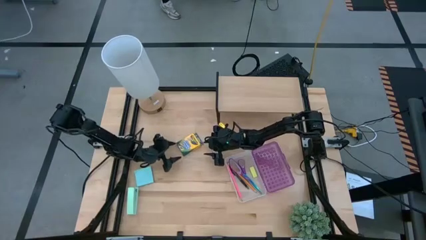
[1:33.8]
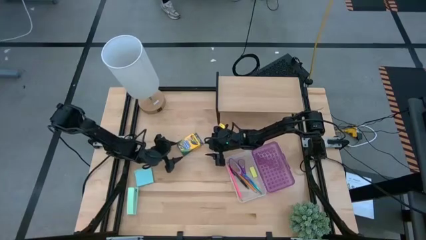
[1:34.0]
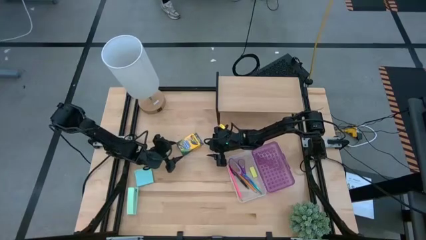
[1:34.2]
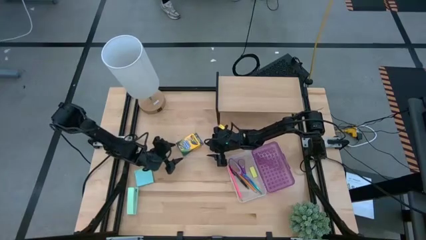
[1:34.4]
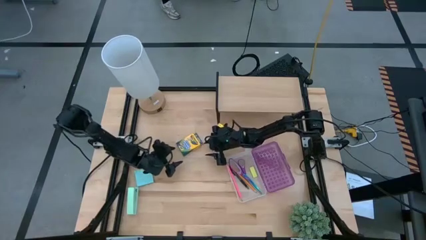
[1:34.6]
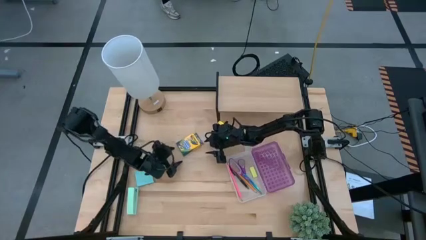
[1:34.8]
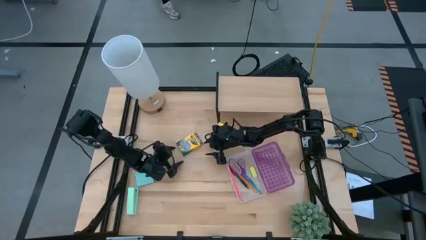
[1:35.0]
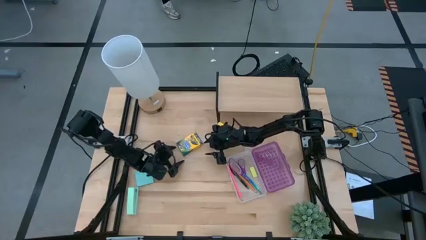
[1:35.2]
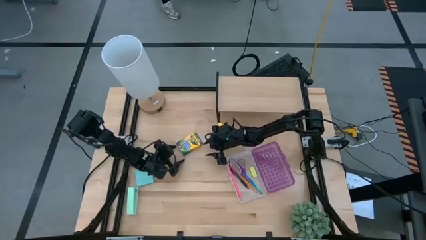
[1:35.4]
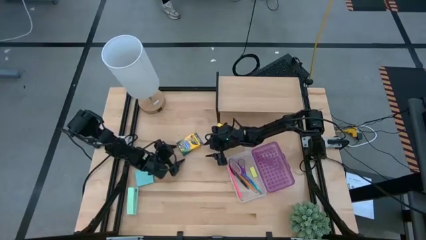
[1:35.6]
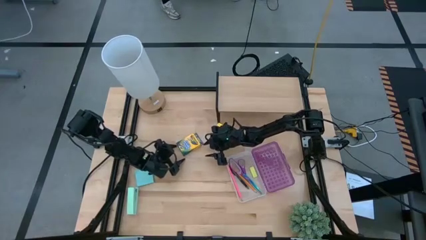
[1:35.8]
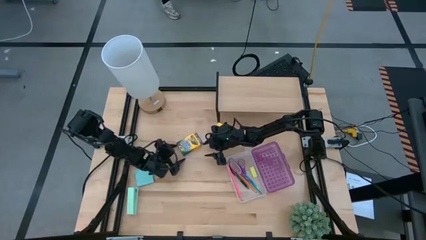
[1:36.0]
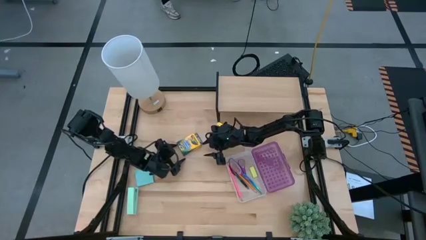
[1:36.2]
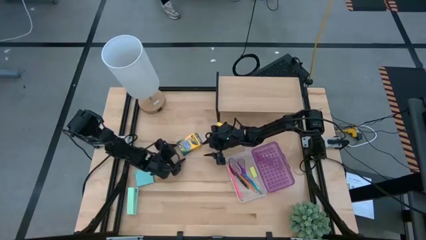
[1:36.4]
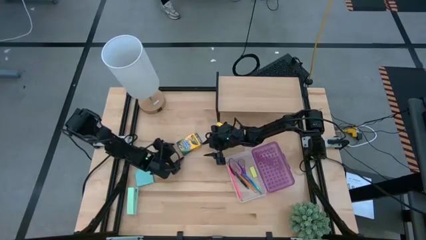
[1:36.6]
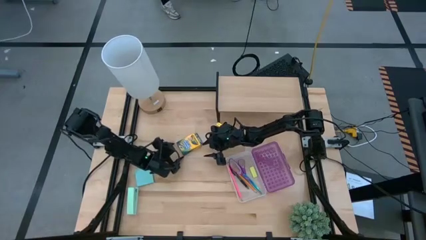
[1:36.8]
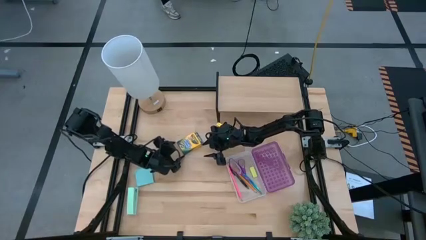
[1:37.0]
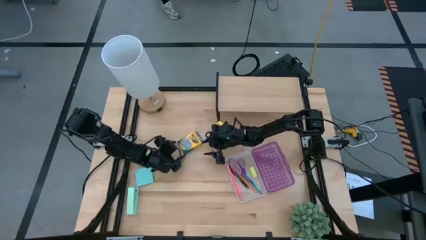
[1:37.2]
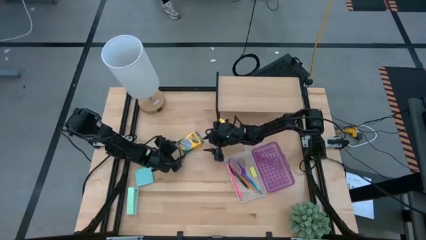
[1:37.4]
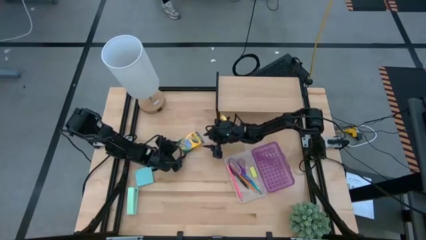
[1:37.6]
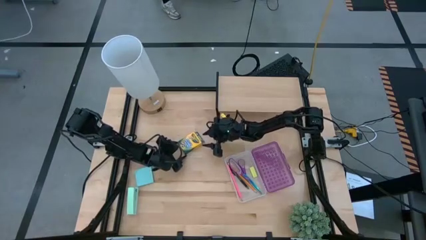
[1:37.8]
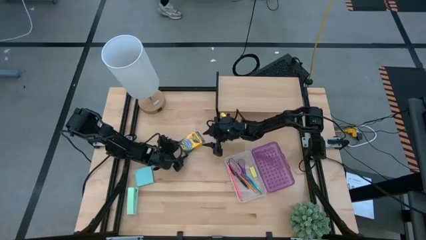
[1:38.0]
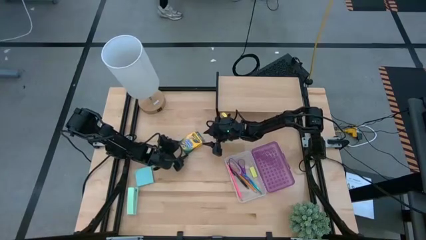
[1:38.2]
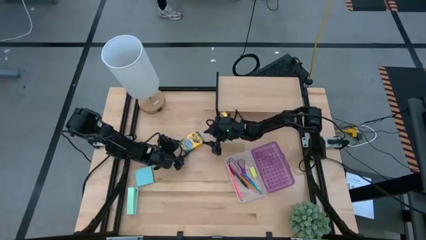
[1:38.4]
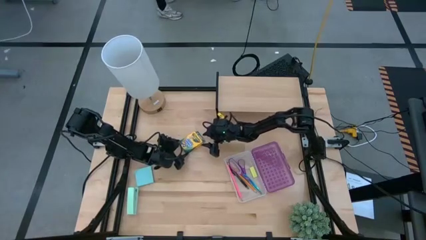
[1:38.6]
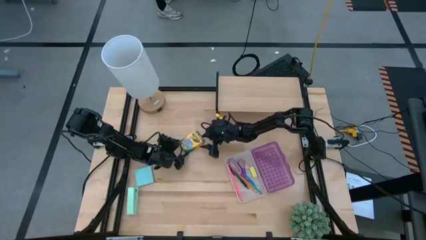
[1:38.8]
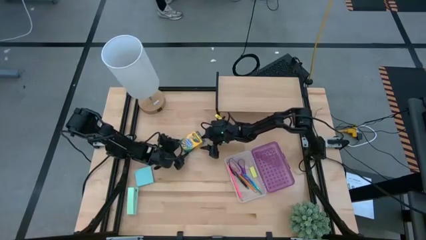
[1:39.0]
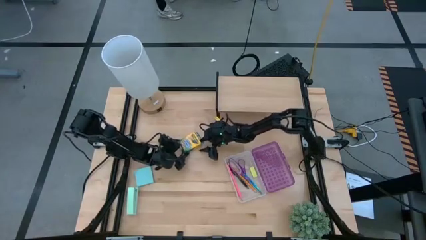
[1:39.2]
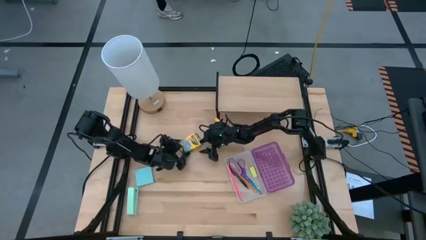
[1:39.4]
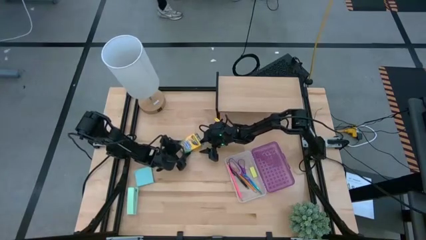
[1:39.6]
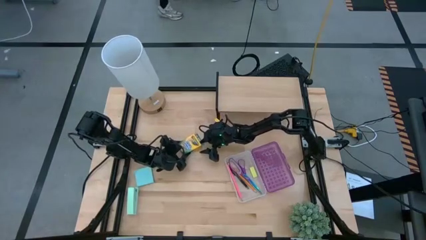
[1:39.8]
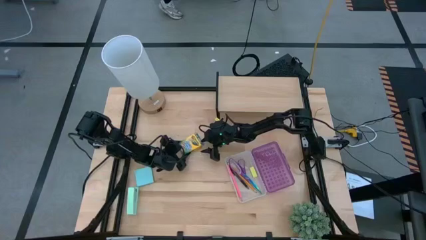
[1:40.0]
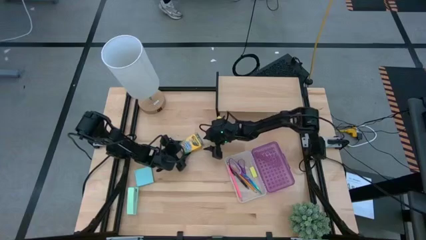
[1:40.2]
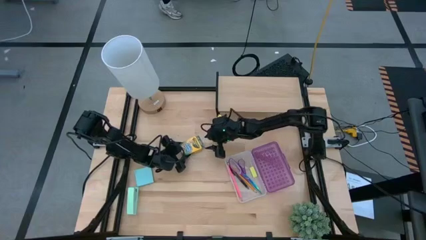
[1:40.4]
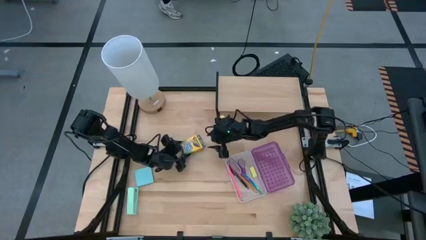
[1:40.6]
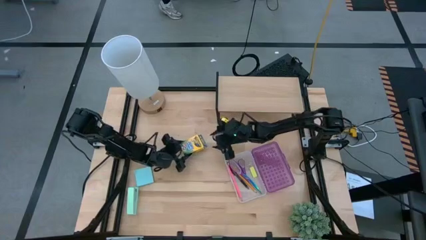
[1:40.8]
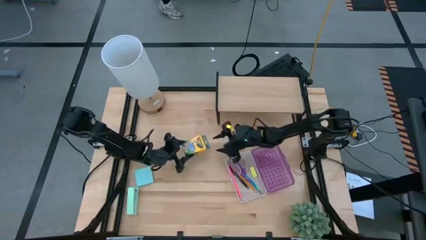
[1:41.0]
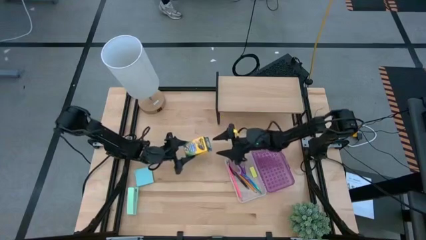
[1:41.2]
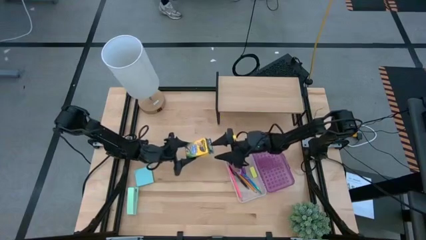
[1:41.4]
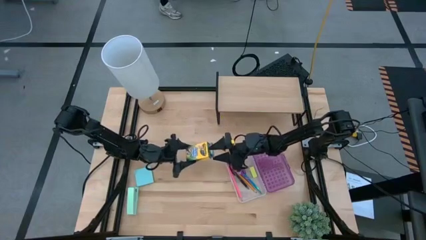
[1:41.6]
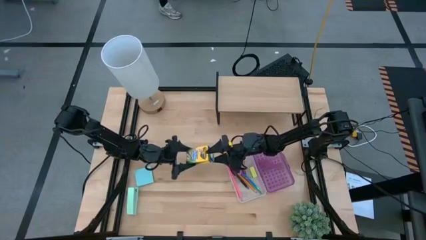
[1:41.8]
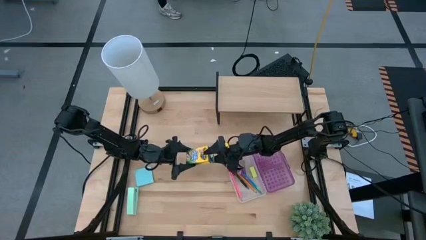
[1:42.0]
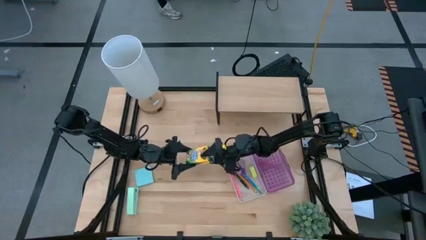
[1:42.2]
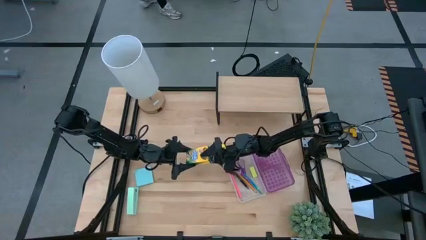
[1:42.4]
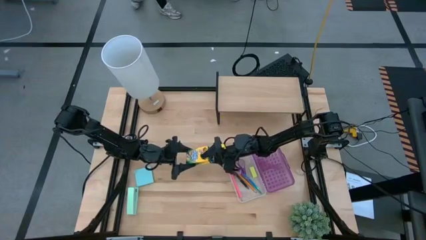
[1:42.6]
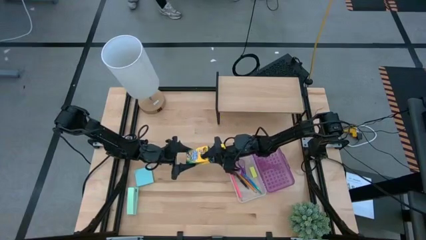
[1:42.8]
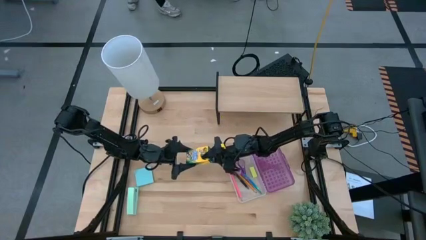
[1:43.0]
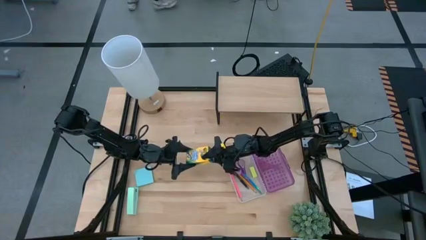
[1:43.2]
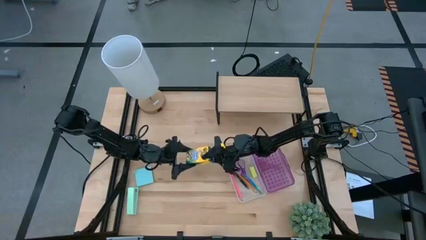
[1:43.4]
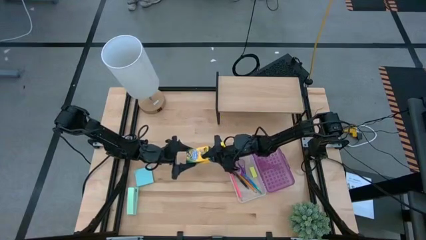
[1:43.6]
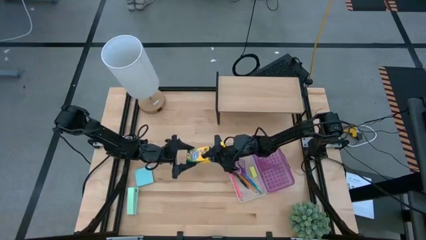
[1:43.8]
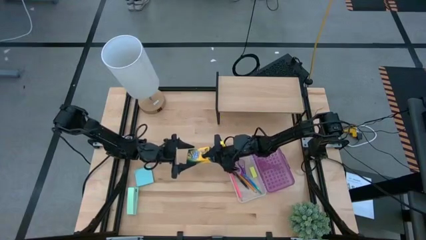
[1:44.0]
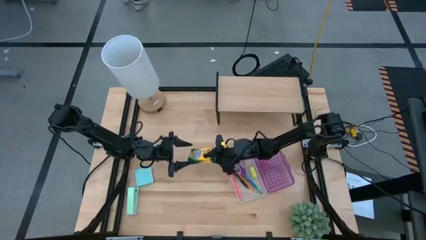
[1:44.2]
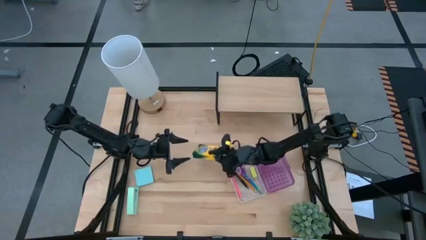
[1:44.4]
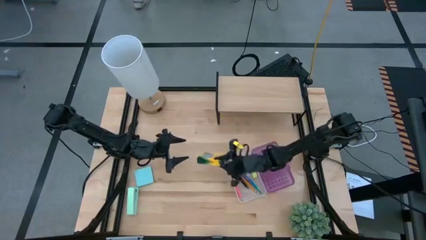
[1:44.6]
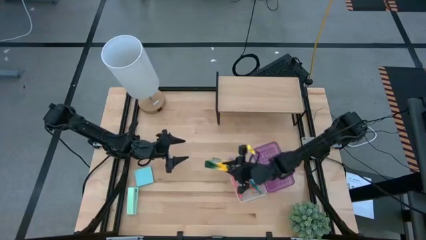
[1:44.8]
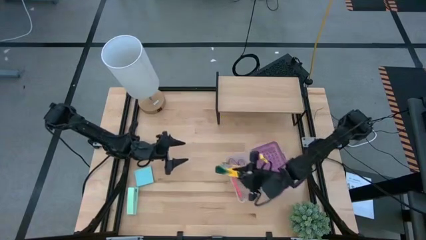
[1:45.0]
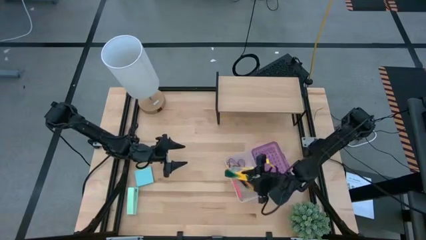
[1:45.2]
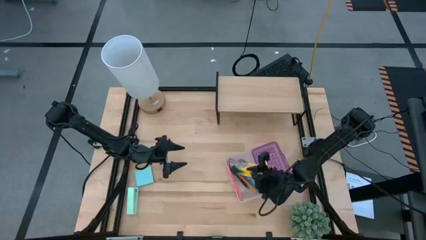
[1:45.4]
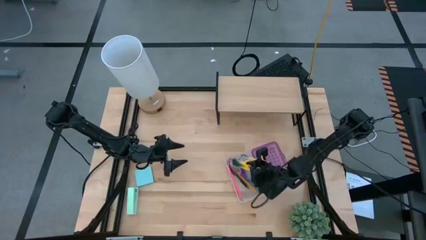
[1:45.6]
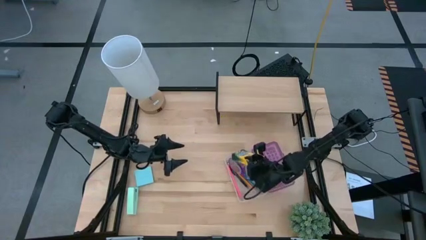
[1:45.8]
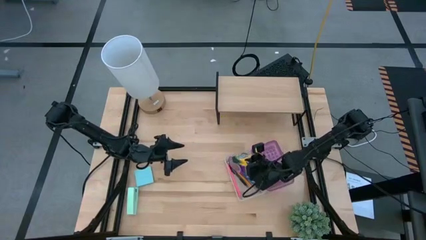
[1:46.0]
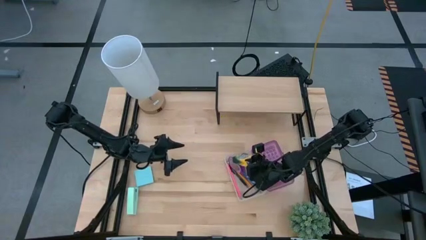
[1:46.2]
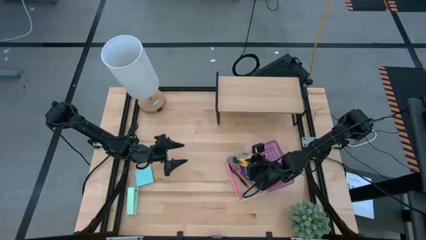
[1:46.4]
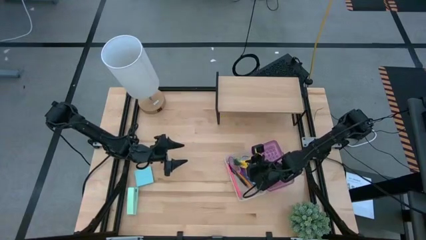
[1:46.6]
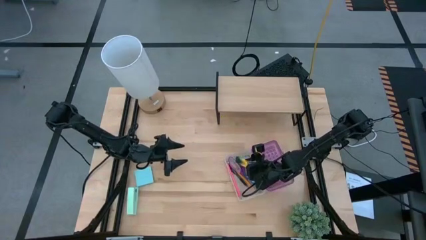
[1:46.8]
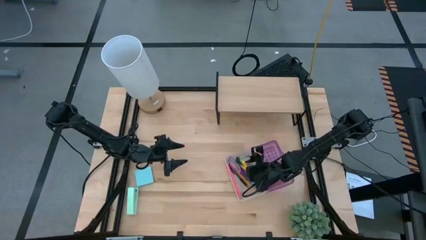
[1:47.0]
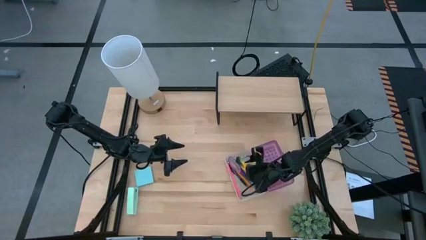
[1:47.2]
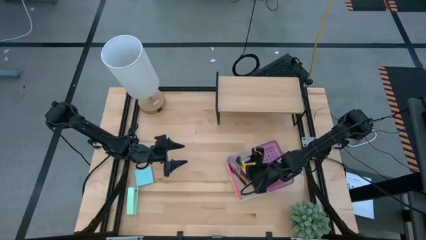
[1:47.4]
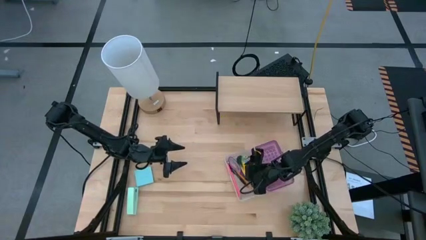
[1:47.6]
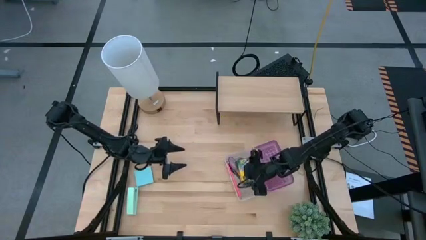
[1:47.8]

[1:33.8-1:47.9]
Task: Pack school essentials
Put the yellow crayon box into the purple supply box
